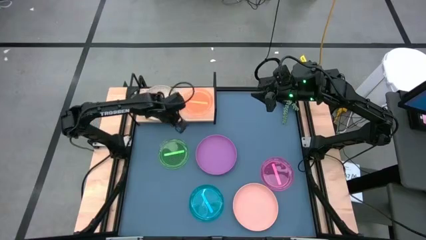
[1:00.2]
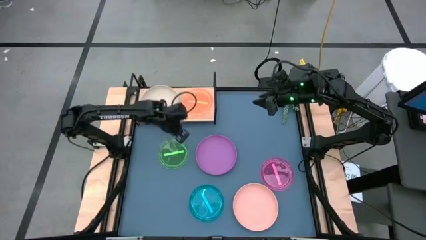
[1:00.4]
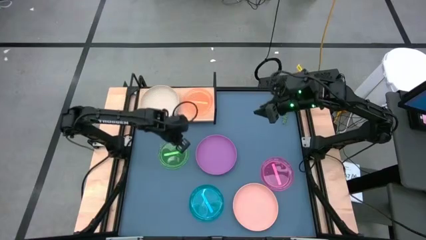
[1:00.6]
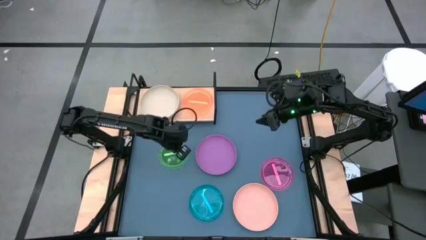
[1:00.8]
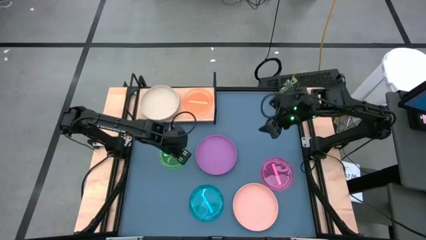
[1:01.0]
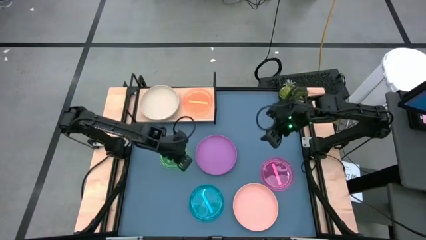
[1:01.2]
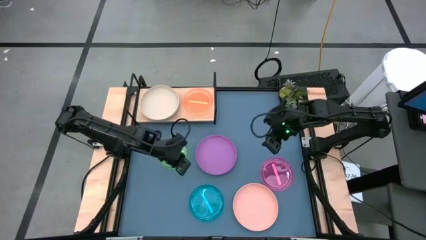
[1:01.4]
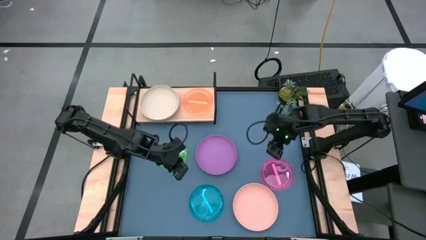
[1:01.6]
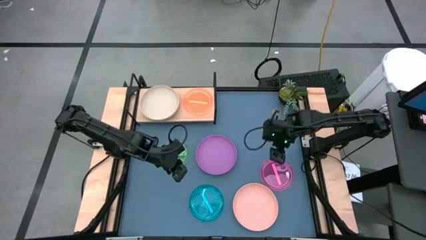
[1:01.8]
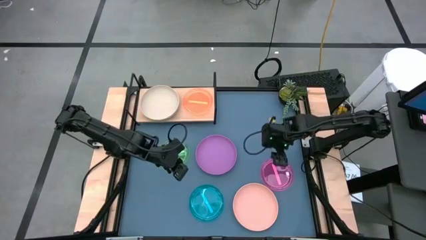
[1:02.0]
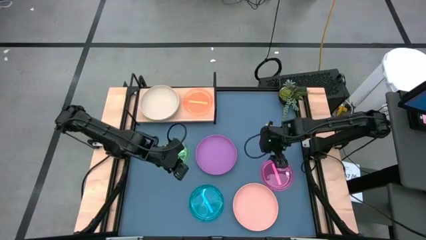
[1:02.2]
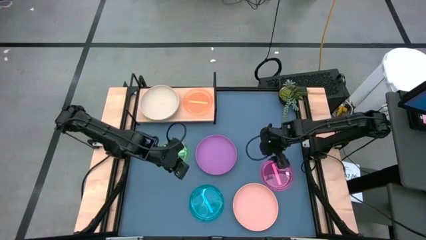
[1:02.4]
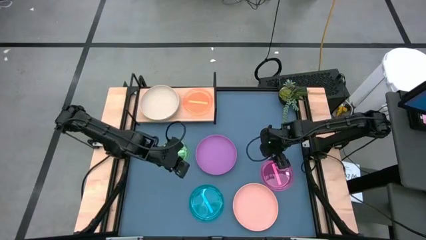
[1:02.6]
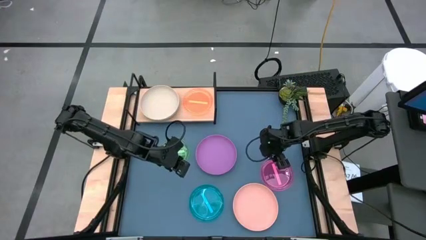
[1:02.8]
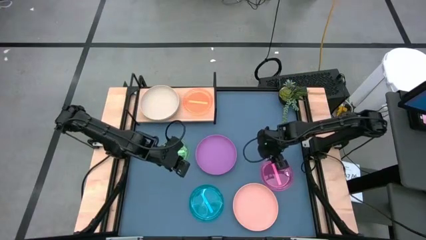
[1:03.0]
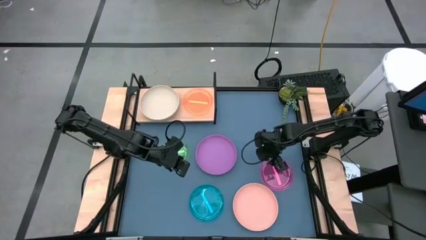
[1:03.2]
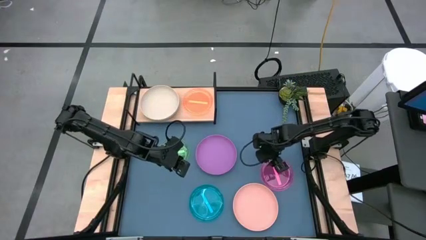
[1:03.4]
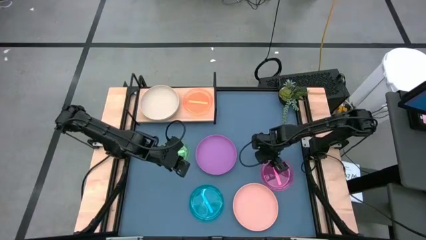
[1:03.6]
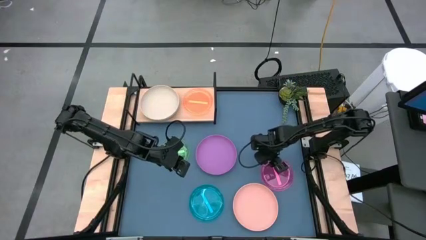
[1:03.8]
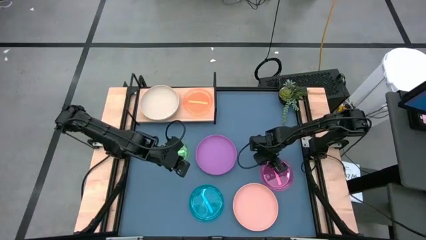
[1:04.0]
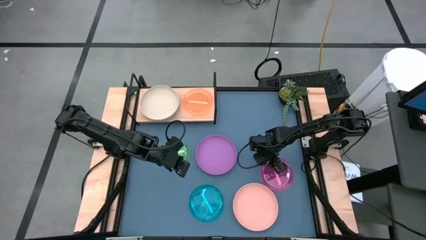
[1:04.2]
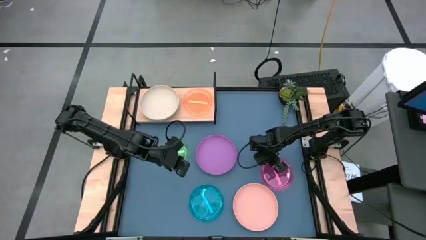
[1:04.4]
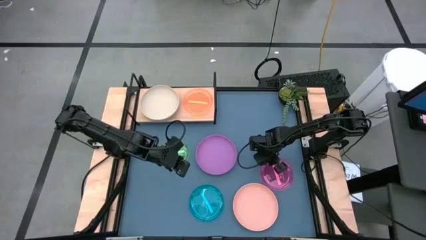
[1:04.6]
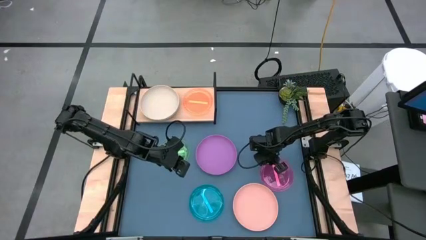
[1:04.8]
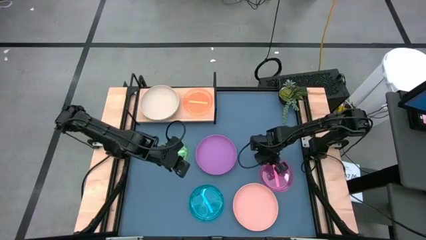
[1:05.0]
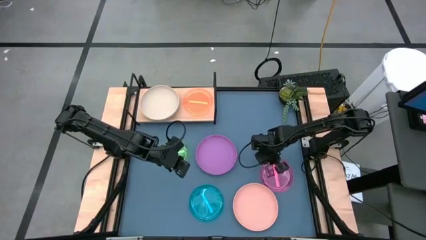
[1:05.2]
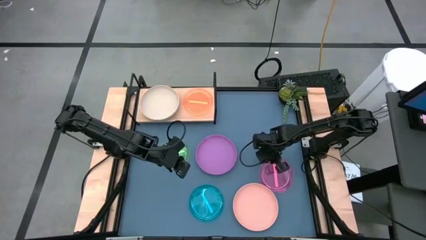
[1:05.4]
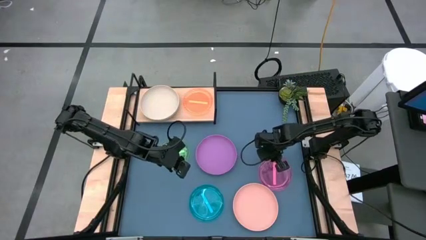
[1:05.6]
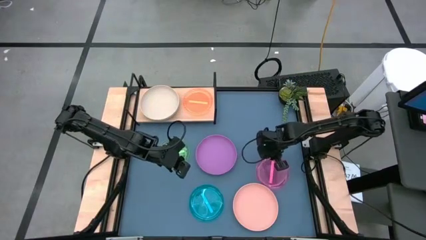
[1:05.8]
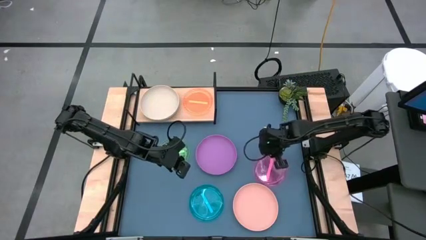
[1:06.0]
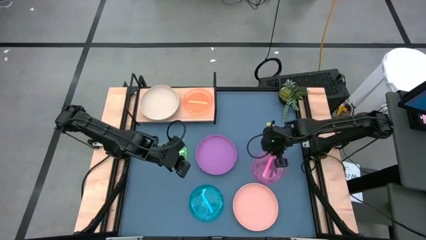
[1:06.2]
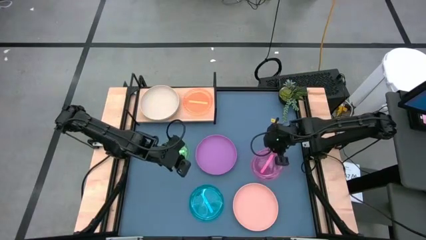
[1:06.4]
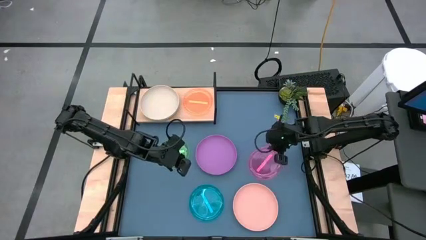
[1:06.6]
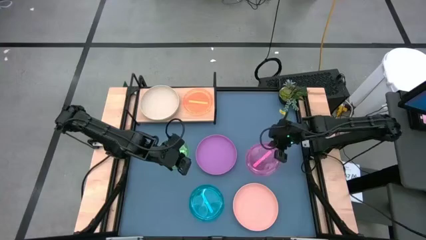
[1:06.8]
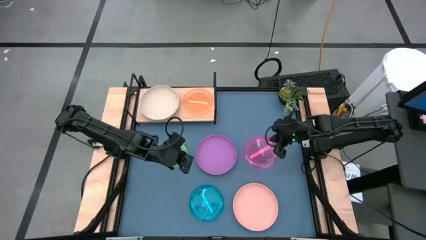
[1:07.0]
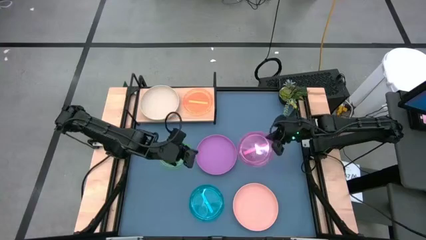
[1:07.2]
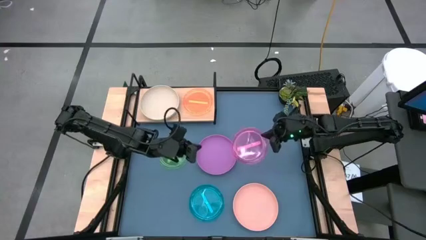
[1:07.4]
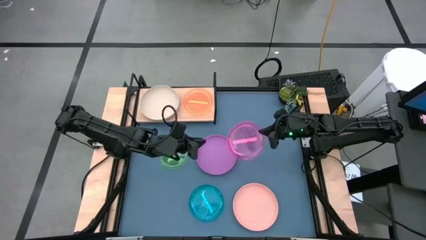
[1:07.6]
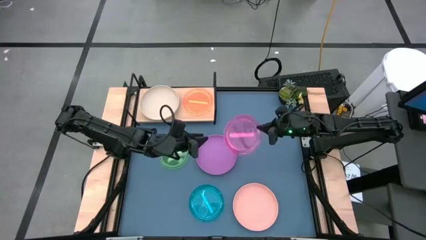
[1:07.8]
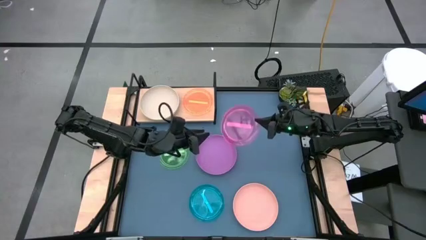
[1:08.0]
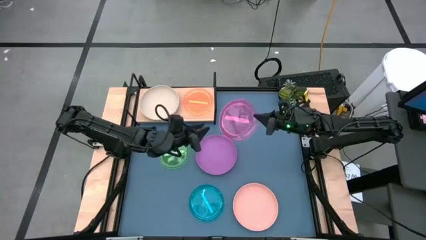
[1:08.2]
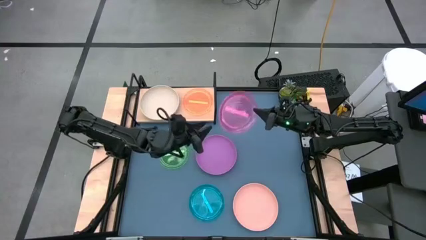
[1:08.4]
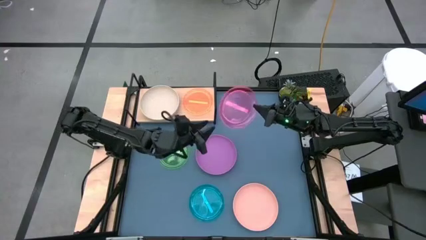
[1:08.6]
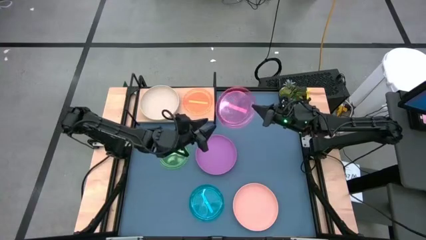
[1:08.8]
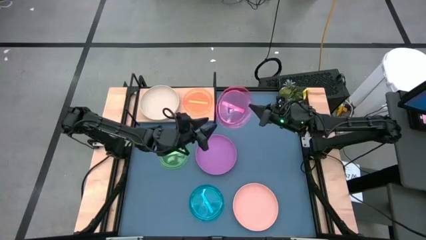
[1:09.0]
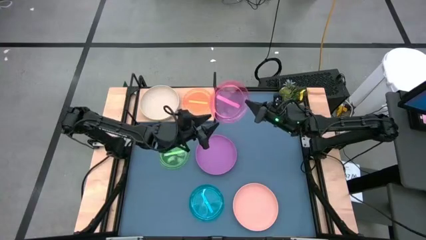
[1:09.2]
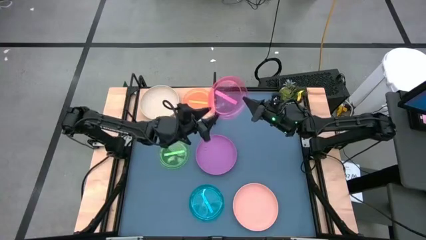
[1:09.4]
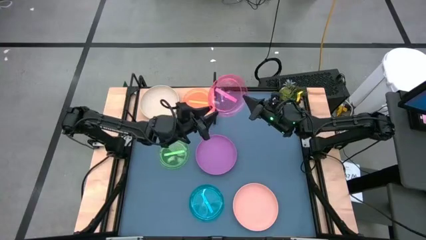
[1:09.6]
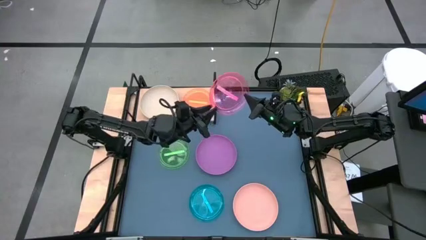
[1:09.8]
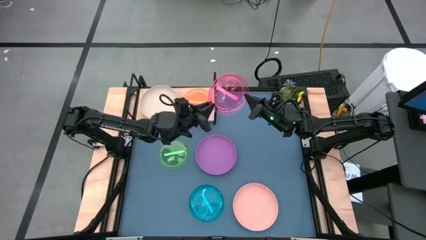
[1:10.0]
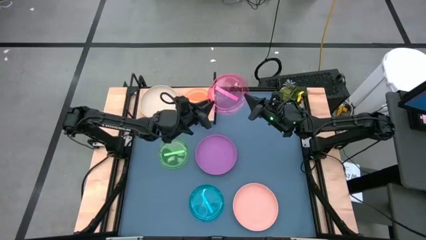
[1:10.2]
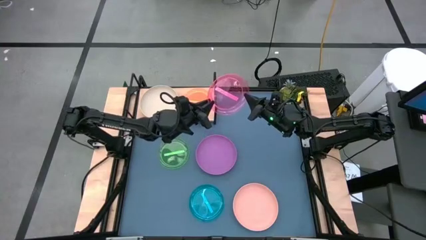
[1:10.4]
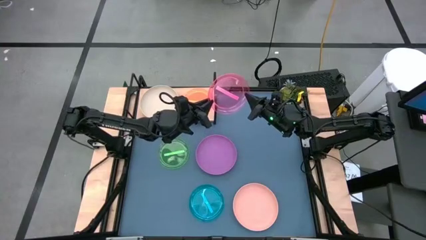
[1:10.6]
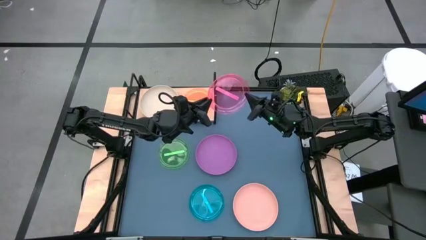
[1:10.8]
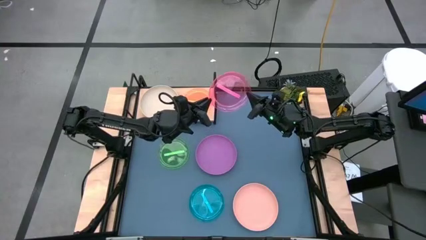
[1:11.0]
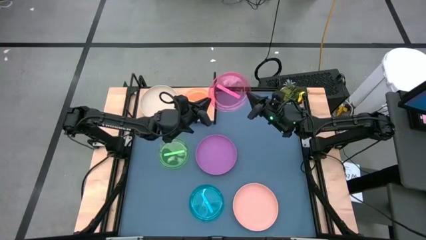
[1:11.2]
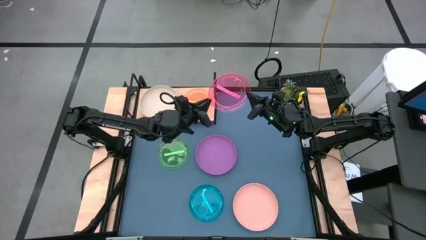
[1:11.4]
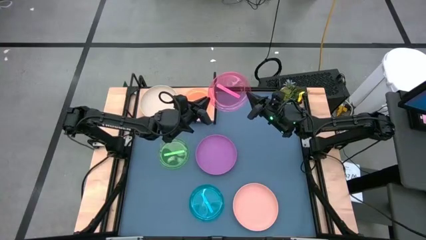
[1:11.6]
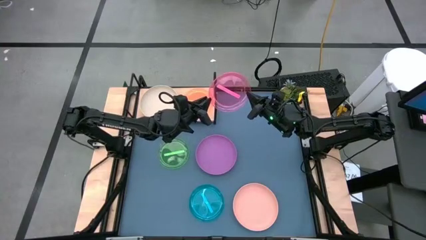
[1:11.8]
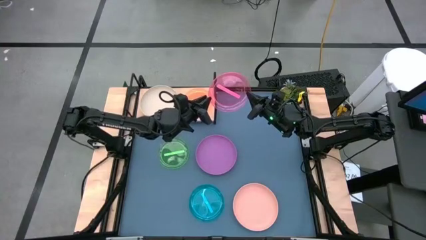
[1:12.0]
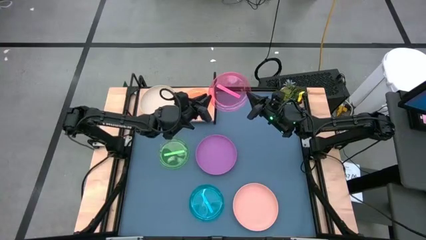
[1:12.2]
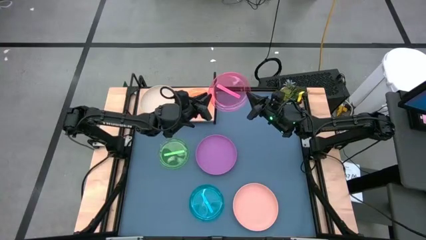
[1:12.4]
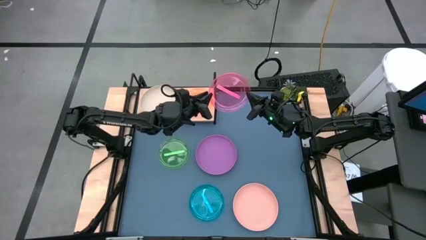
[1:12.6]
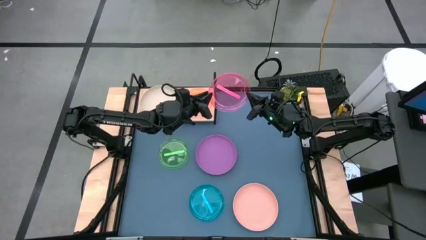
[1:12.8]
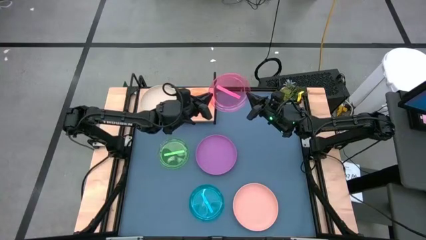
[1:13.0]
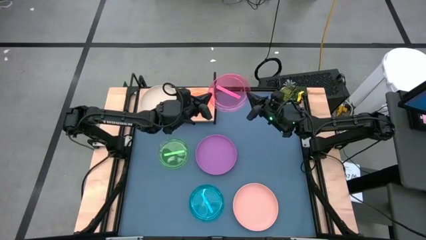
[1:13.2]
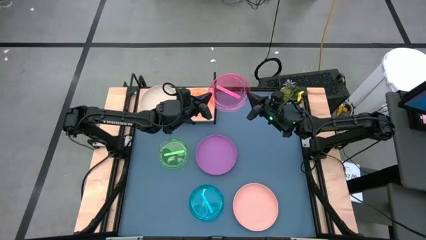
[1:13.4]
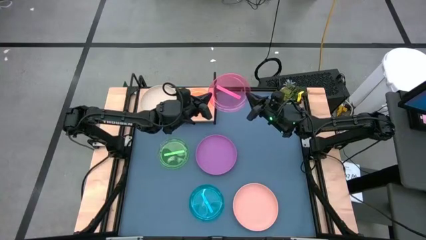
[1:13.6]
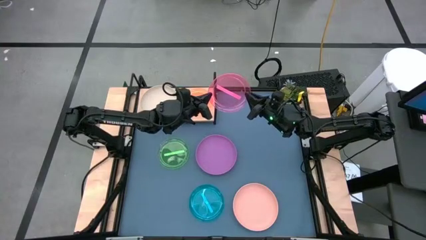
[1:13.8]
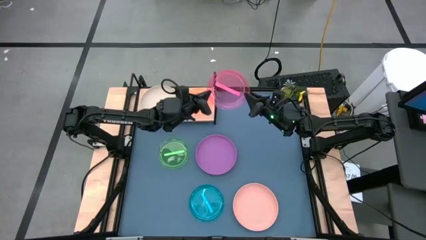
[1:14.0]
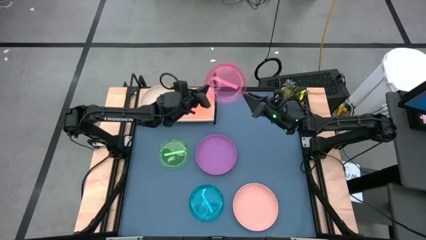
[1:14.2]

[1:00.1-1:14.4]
Task: Place and stack plates onto a shelf
Stack the pink plate on top of the orange plate on the shelf

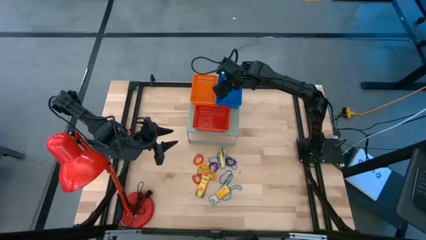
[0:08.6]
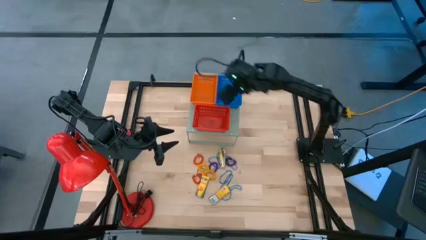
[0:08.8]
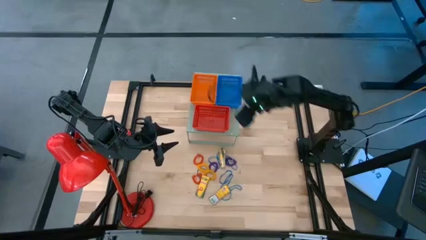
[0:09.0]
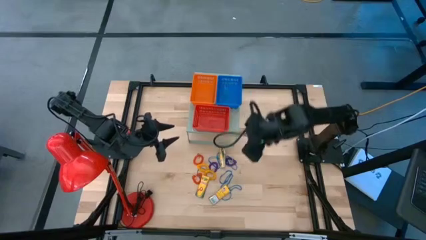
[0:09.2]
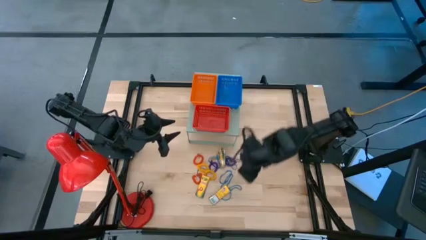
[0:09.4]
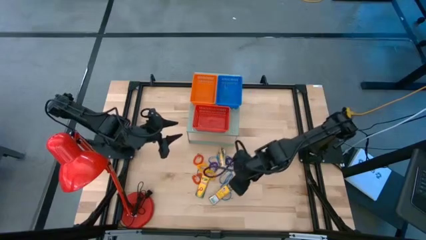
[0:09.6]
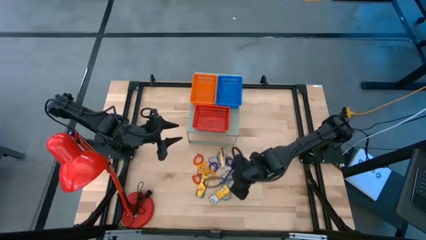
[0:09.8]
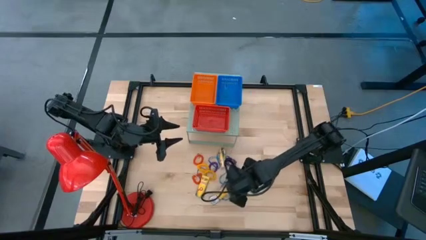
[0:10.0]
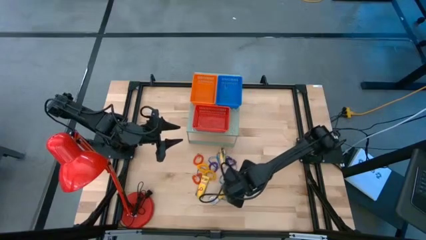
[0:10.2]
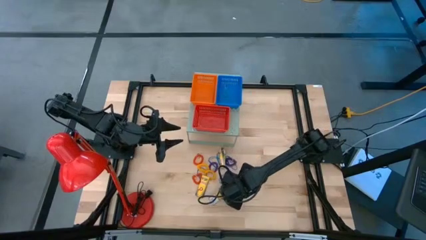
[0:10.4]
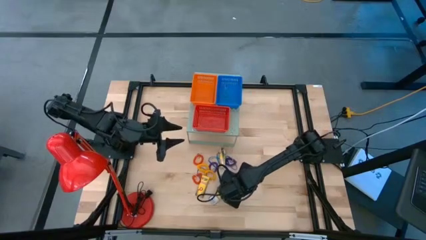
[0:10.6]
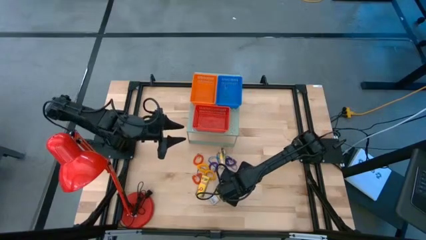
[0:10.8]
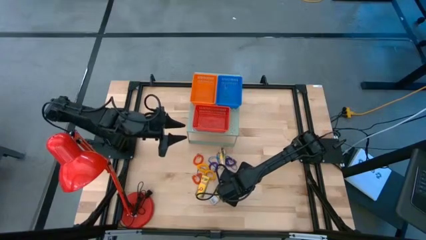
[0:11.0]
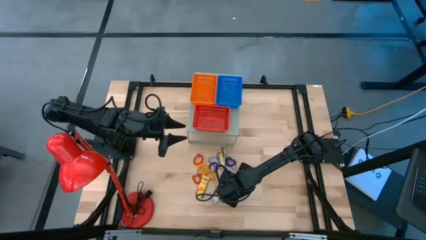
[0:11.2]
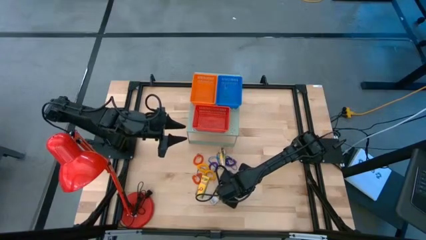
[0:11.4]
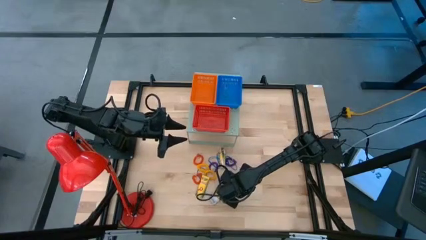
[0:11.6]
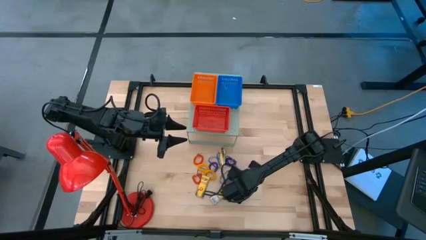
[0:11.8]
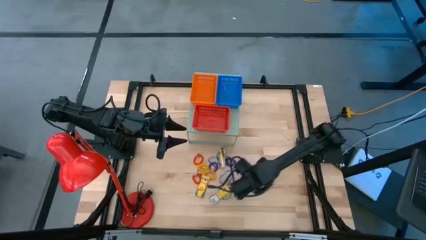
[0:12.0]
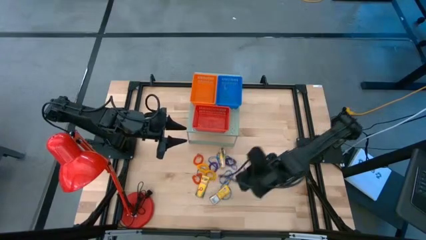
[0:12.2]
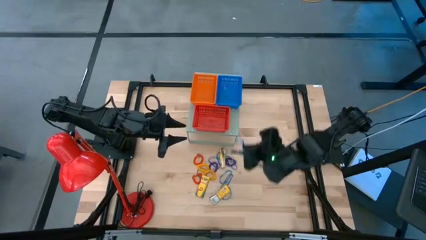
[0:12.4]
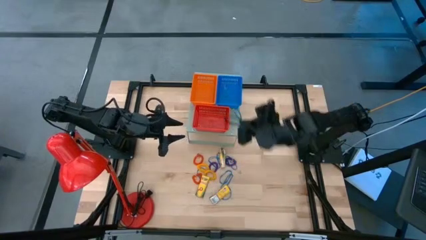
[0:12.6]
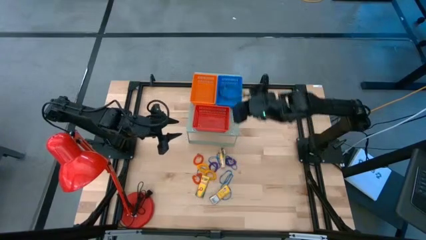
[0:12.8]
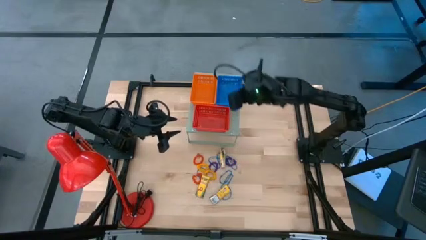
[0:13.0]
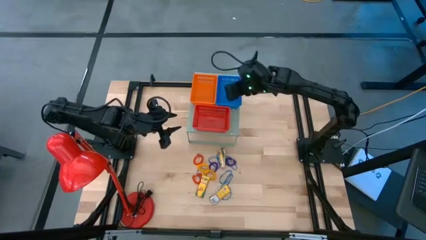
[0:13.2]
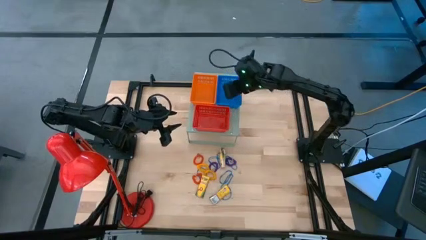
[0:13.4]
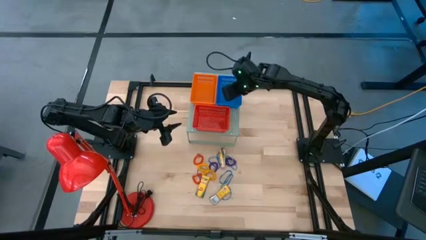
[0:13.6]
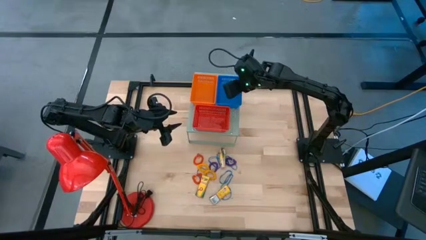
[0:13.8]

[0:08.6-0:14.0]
Task: Pick & Place Office Desk Supplies
Put the blue rubber band into the blue bin
